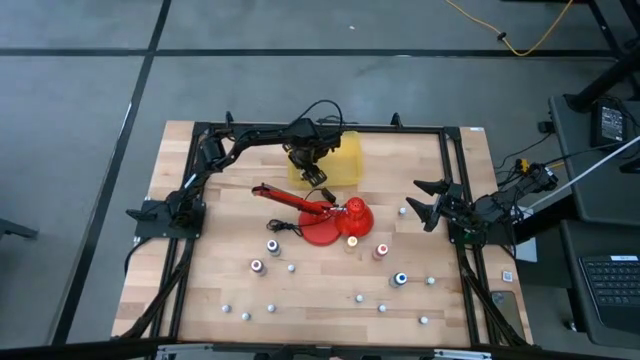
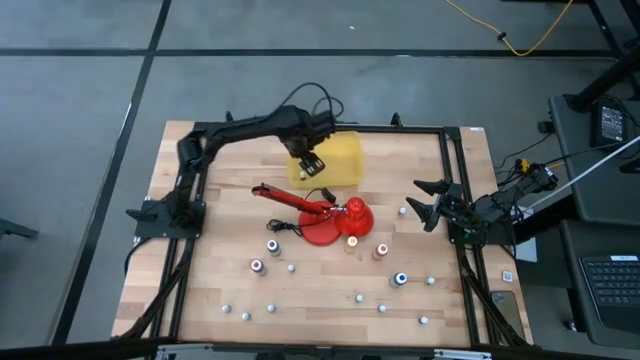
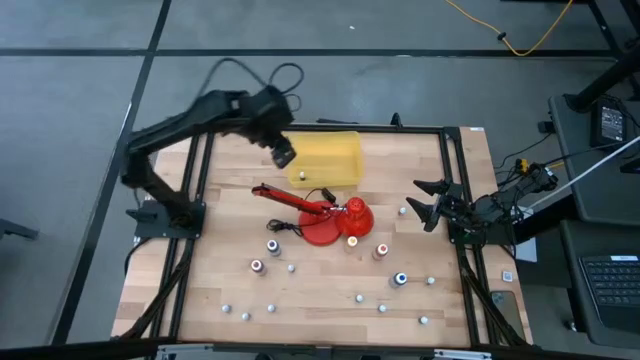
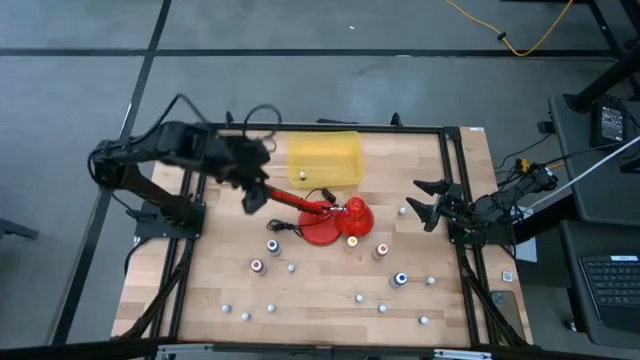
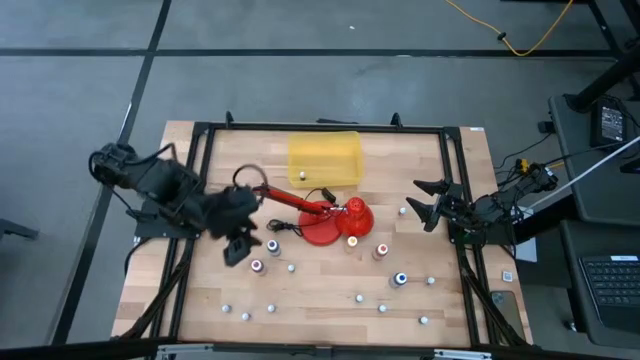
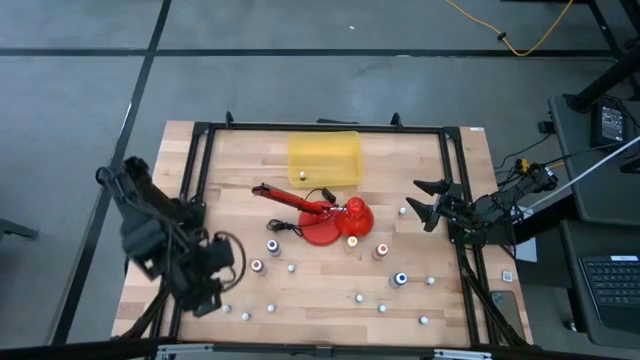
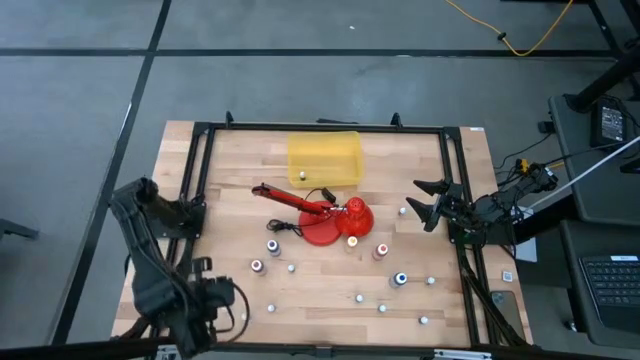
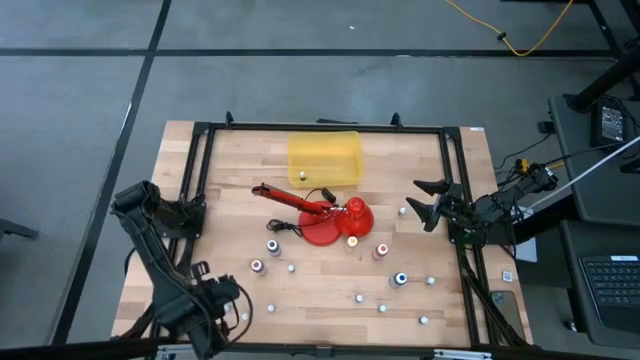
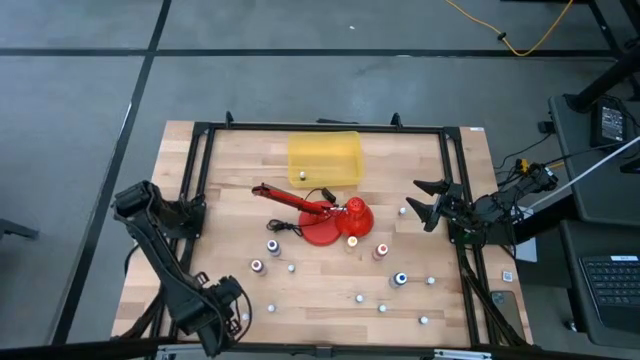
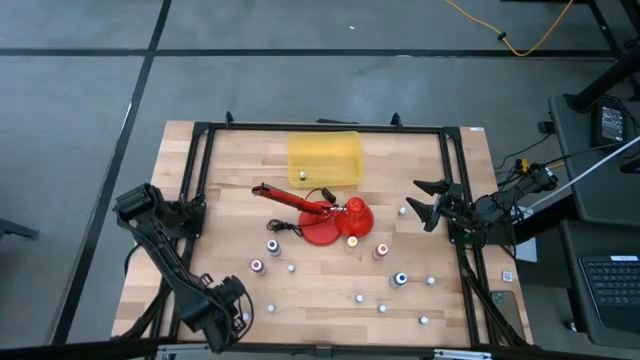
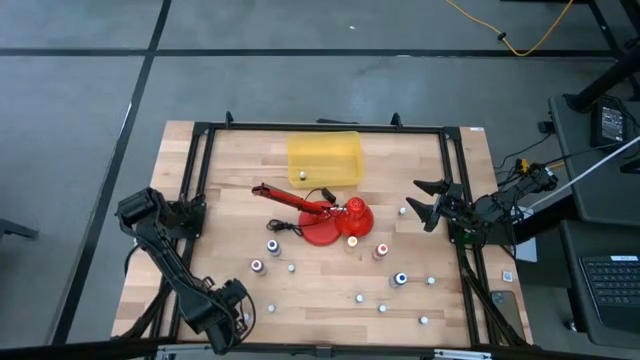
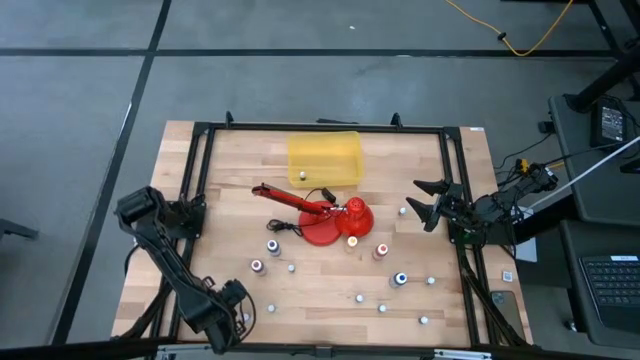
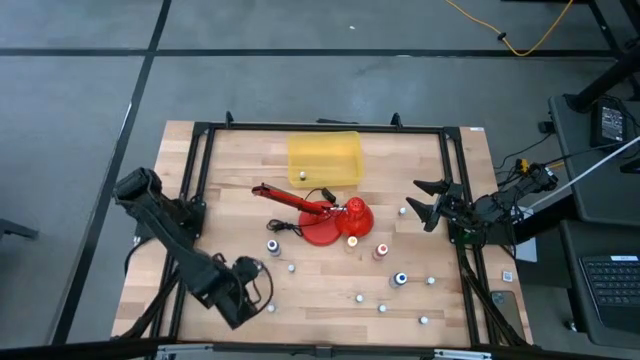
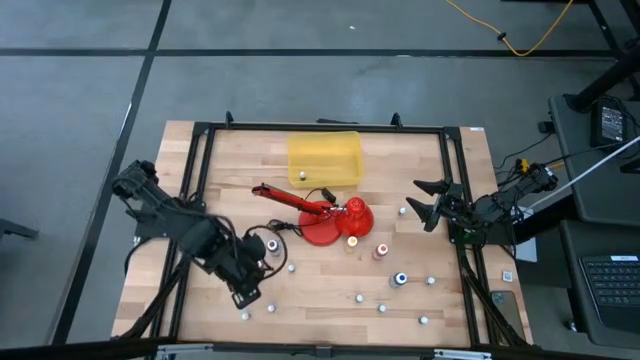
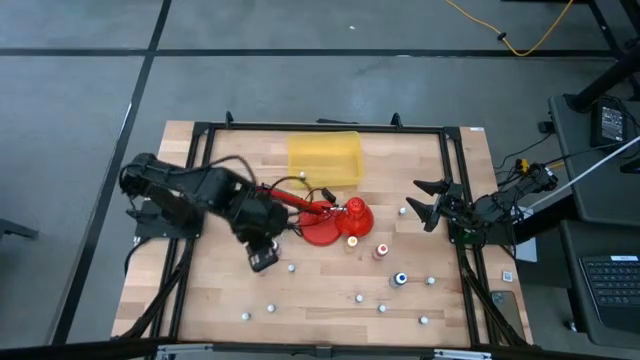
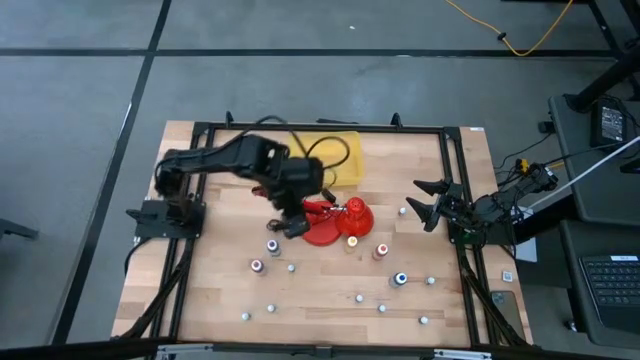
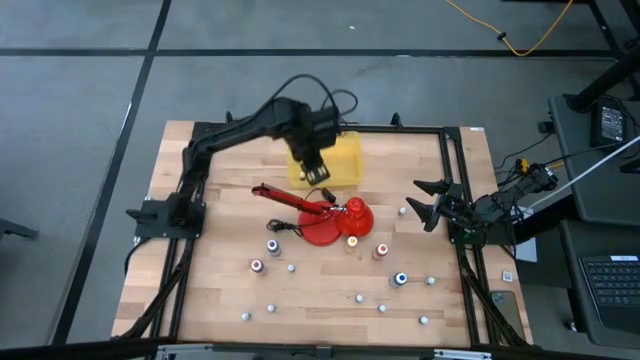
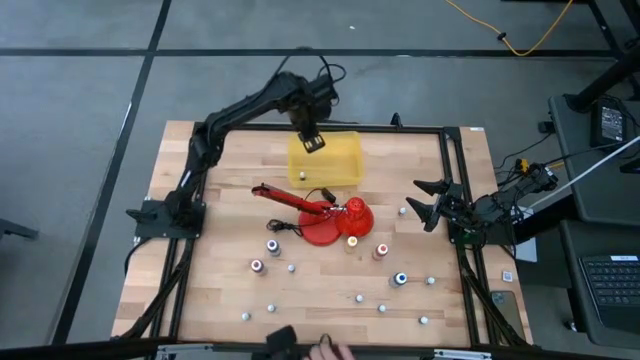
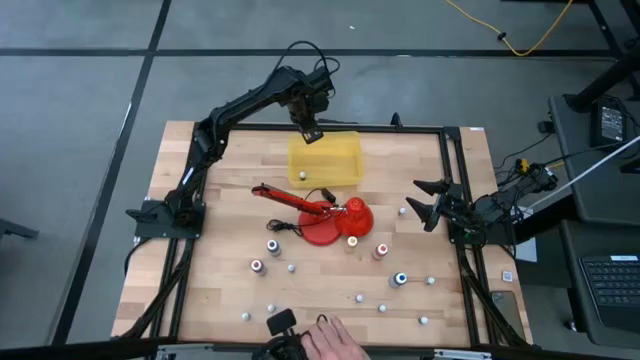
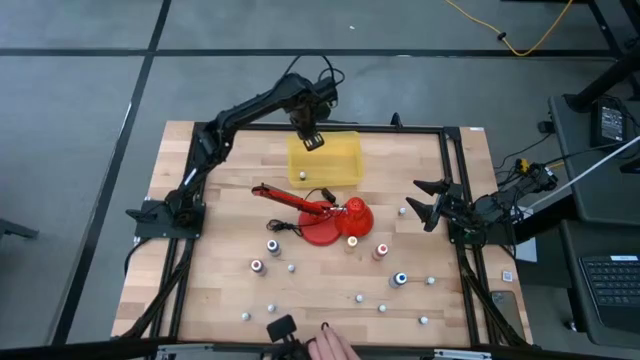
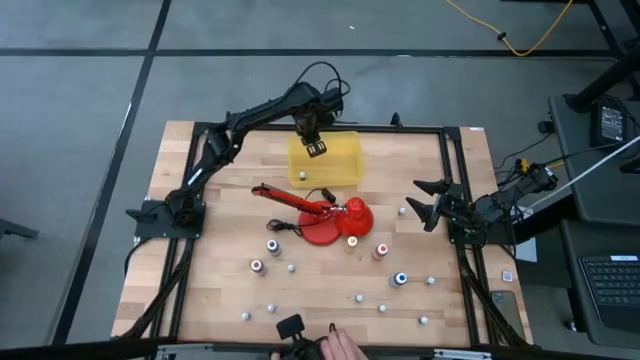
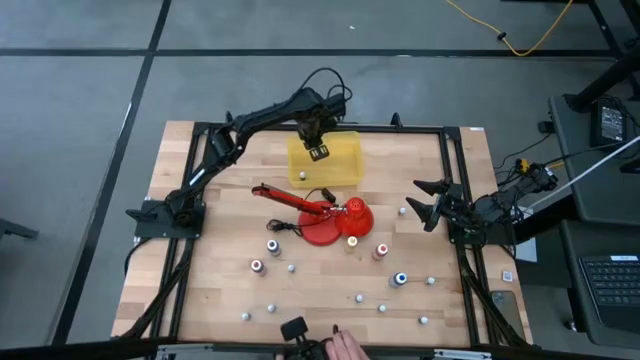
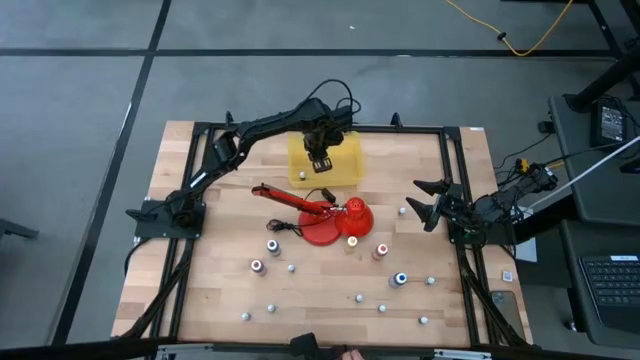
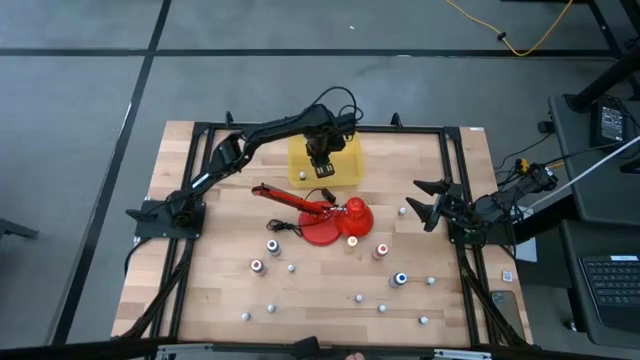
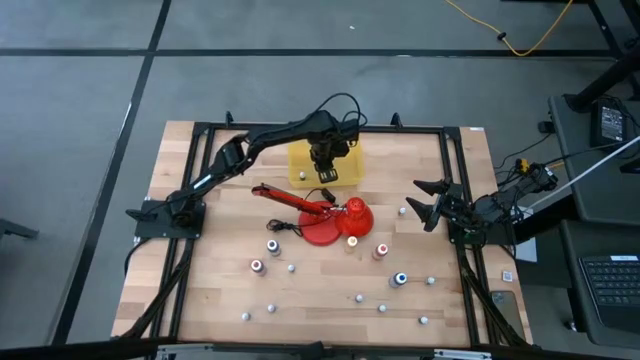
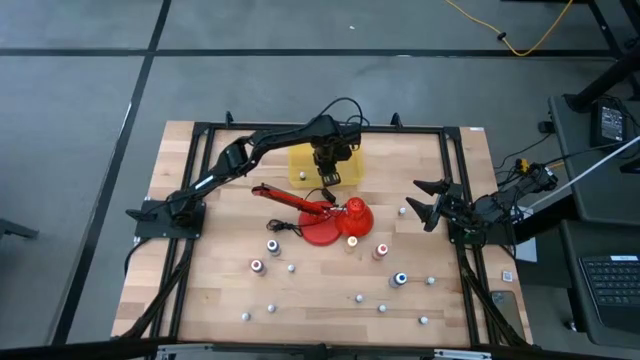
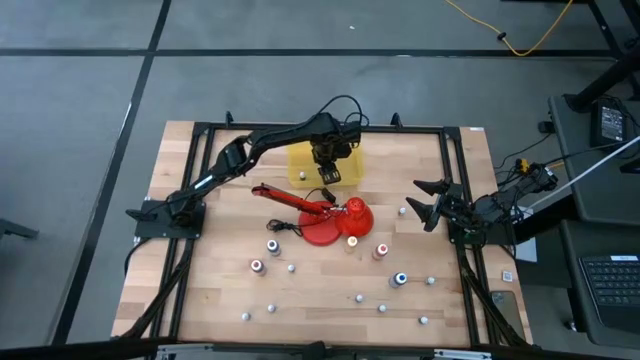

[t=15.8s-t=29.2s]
Task: Pick & Place food coloring
Put the black food coloring bottle into the yellow bin

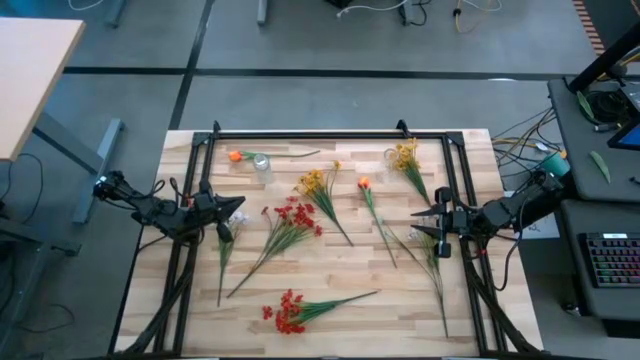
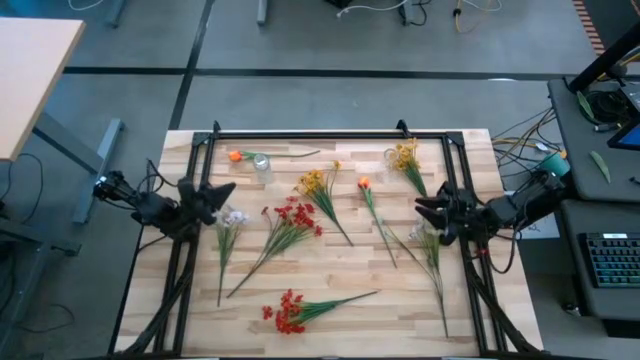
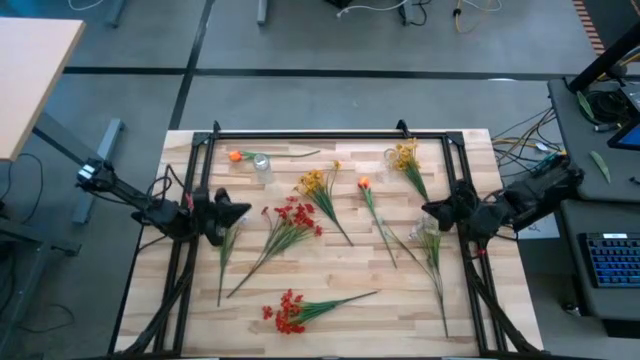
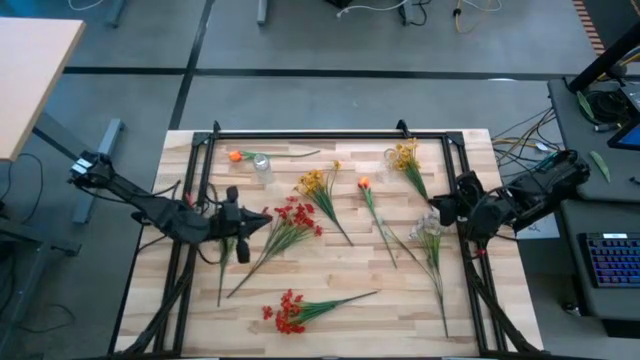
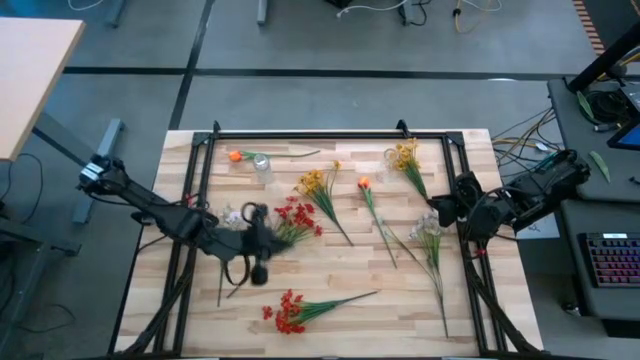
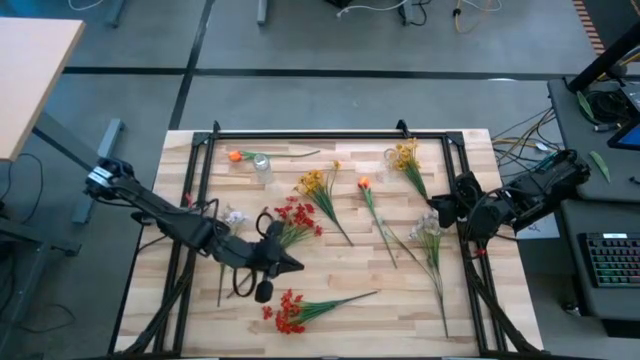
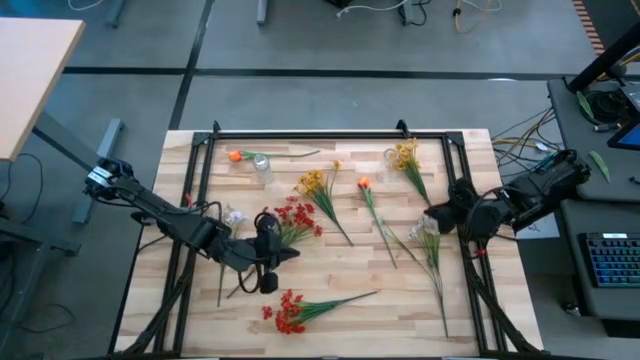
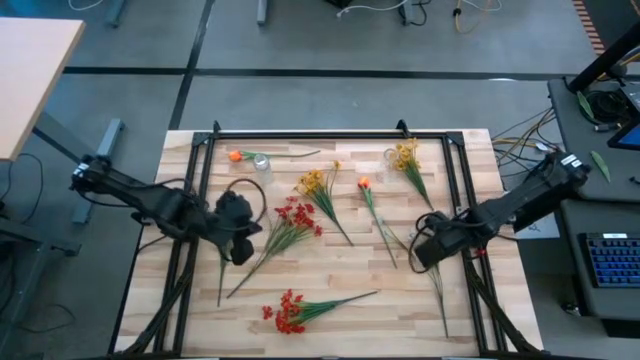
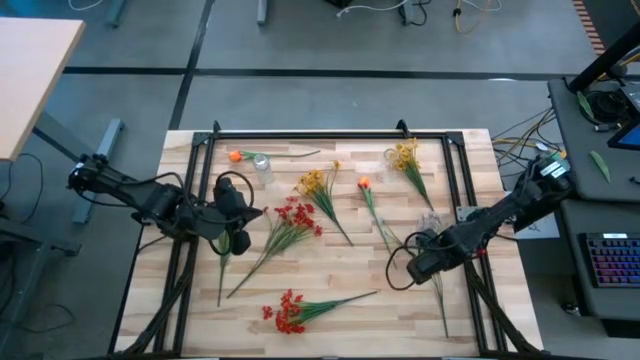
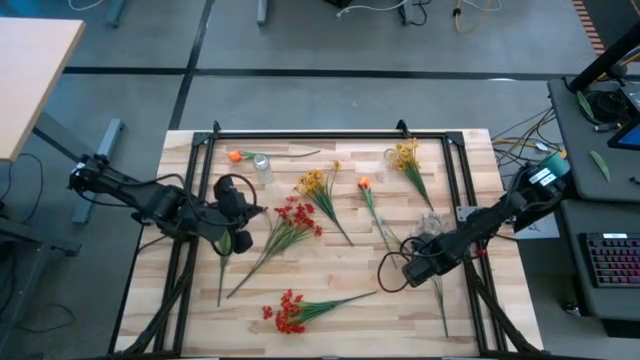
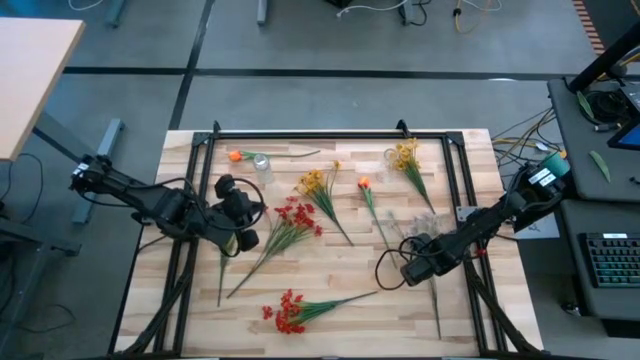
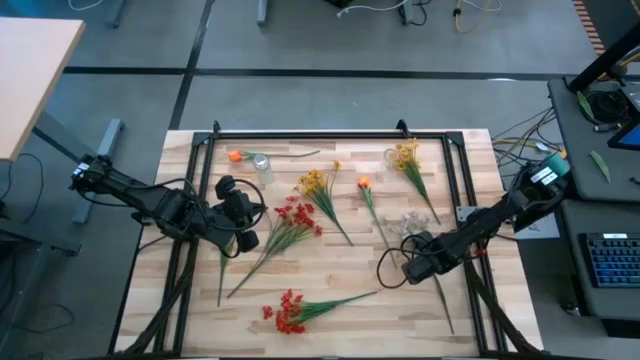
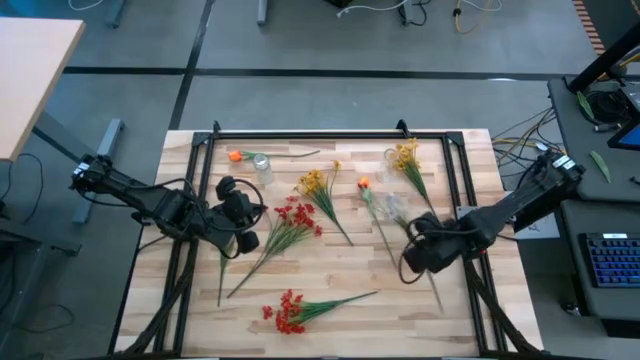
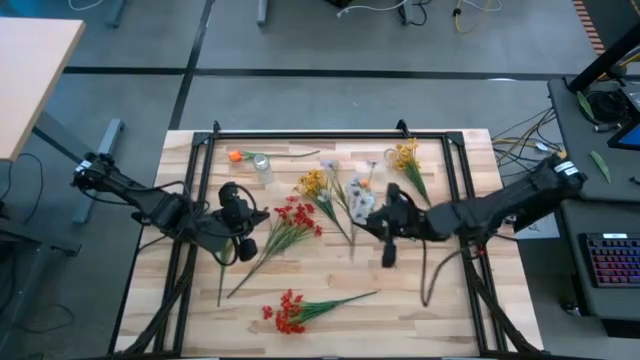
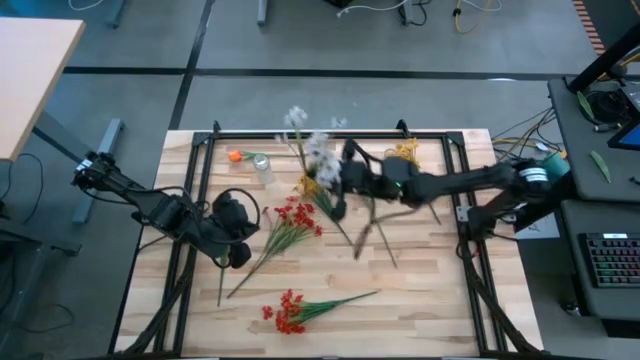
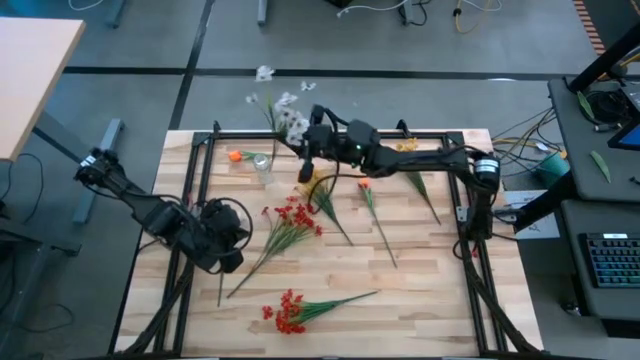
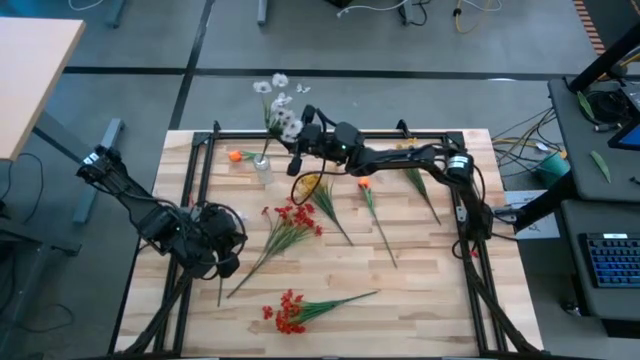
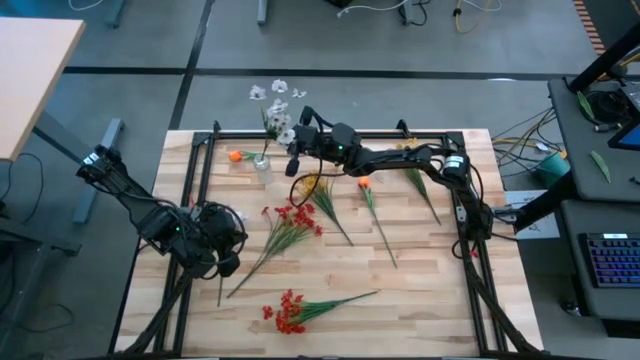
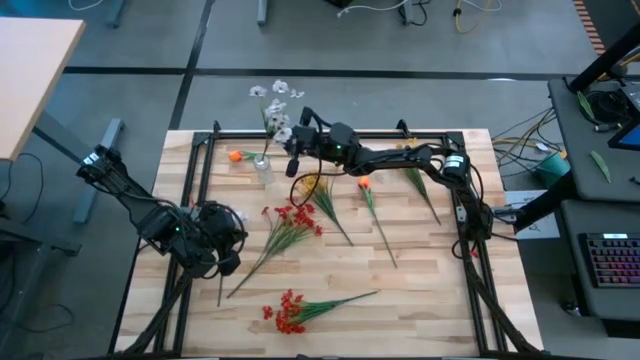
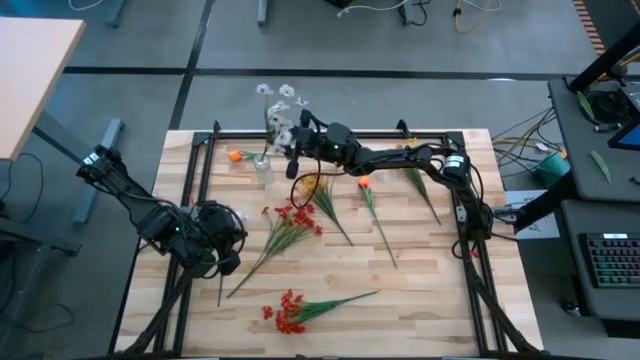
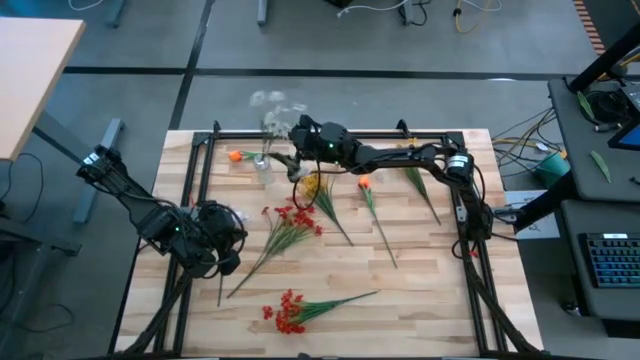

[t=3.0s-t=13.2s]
Task: Sort flowers into vase by color
Put the right white flowers into the left transparent flower vase
